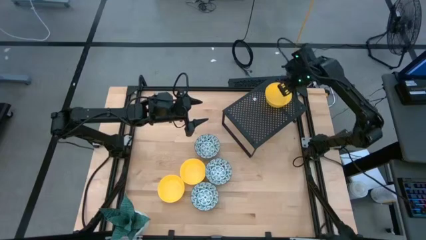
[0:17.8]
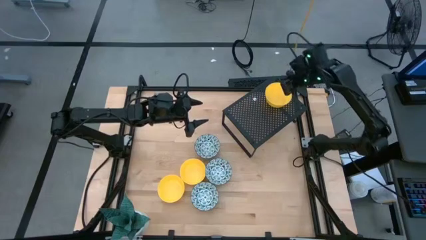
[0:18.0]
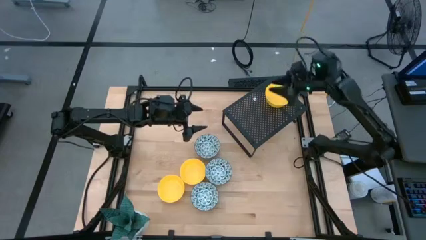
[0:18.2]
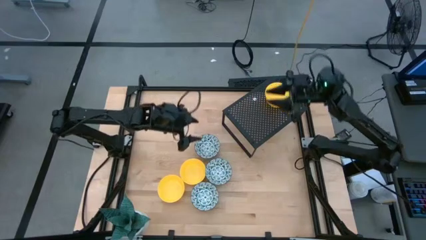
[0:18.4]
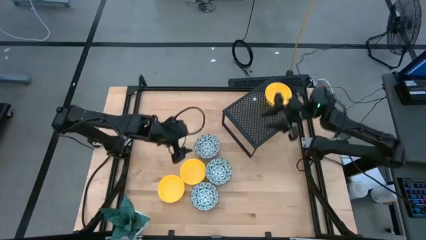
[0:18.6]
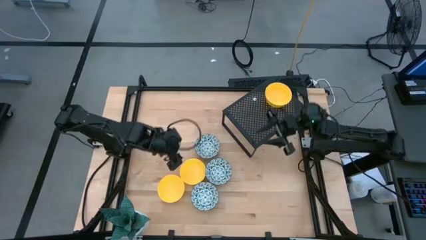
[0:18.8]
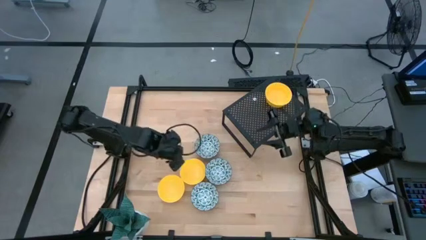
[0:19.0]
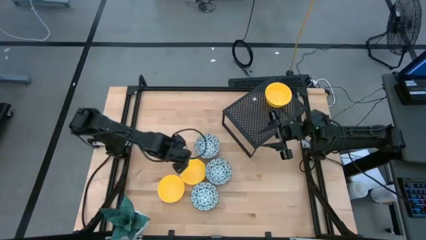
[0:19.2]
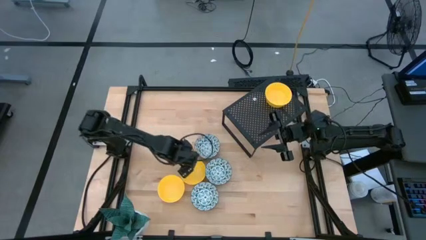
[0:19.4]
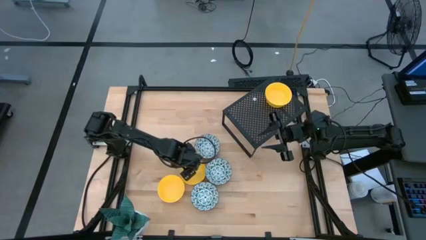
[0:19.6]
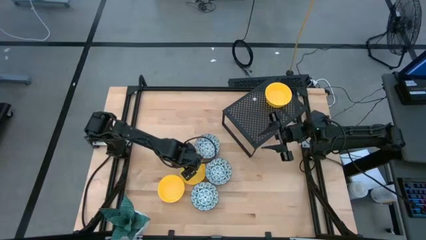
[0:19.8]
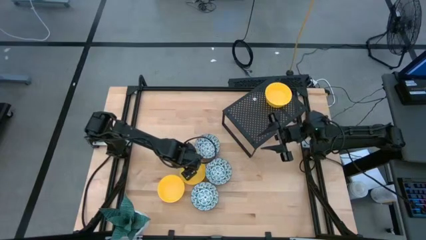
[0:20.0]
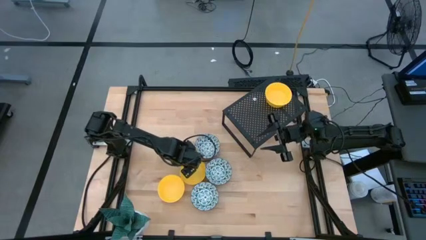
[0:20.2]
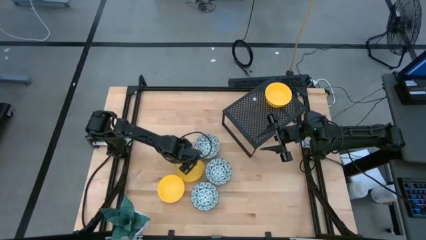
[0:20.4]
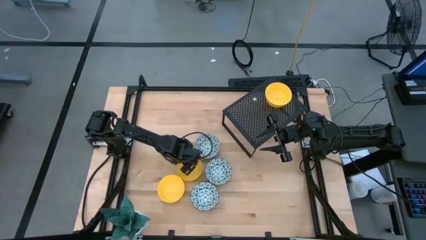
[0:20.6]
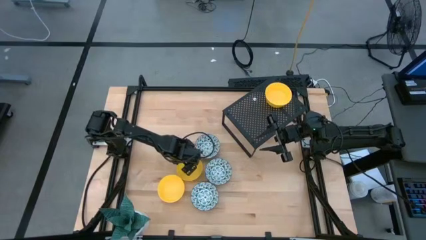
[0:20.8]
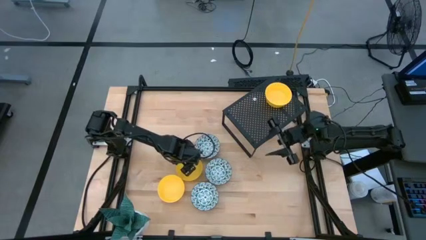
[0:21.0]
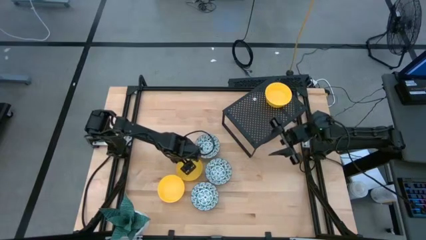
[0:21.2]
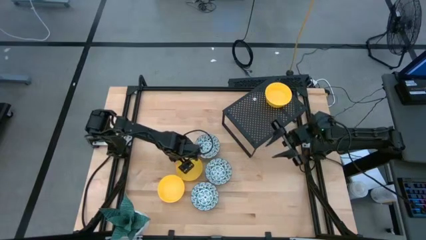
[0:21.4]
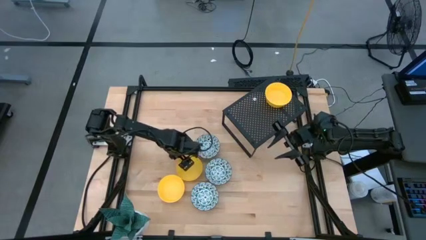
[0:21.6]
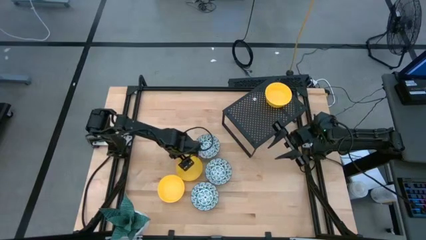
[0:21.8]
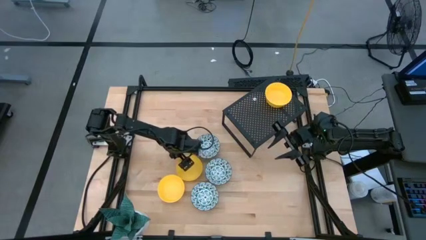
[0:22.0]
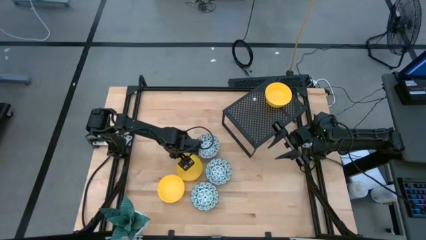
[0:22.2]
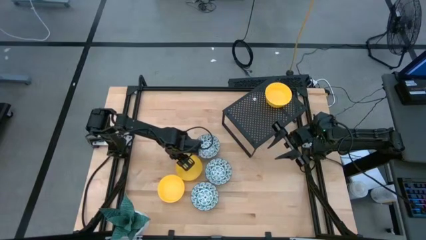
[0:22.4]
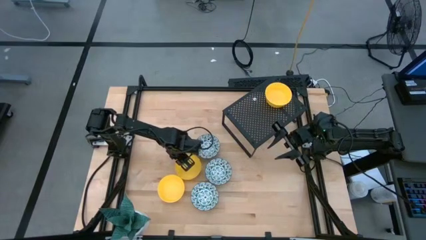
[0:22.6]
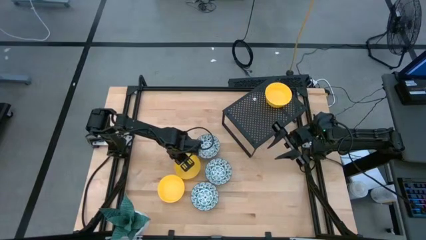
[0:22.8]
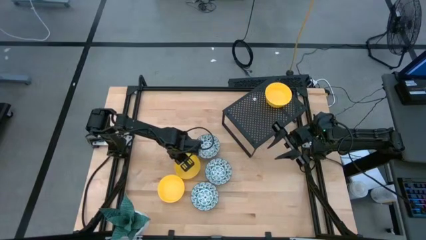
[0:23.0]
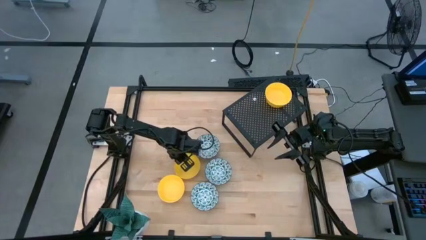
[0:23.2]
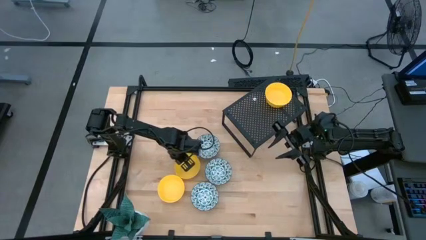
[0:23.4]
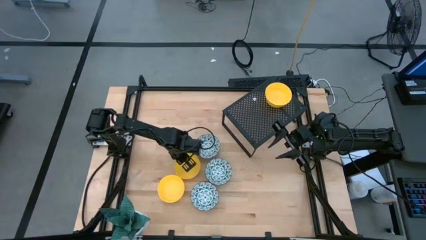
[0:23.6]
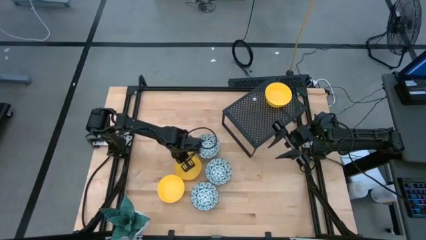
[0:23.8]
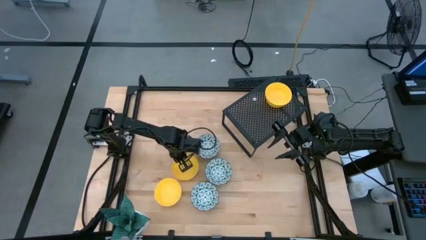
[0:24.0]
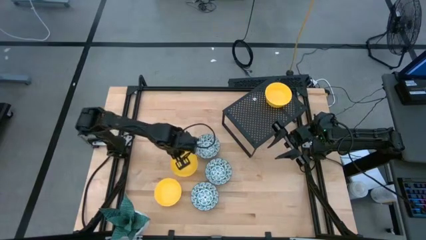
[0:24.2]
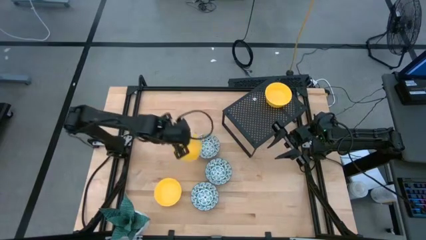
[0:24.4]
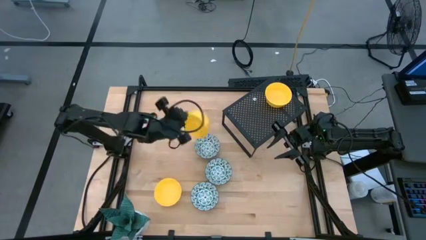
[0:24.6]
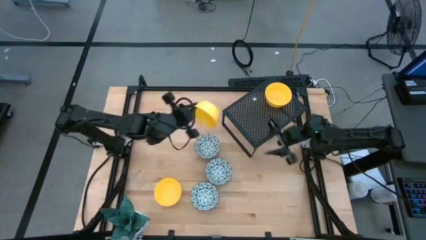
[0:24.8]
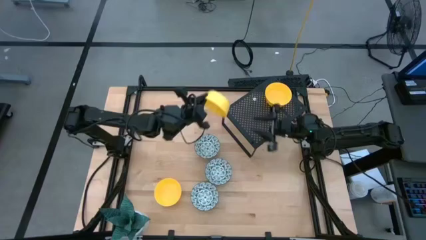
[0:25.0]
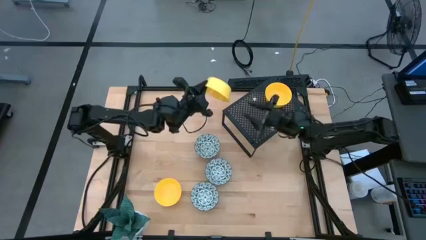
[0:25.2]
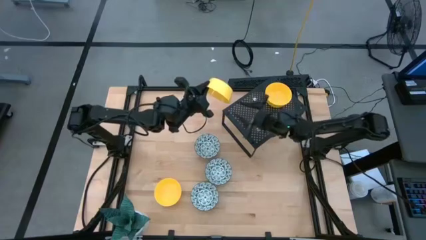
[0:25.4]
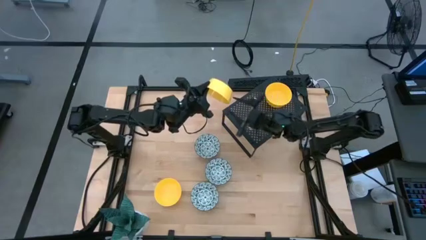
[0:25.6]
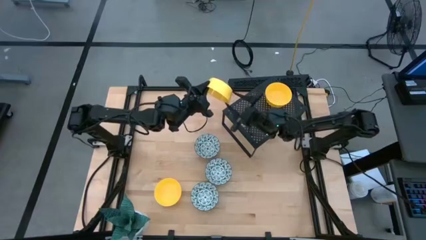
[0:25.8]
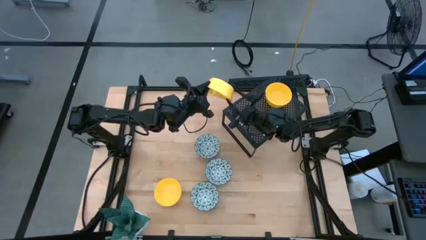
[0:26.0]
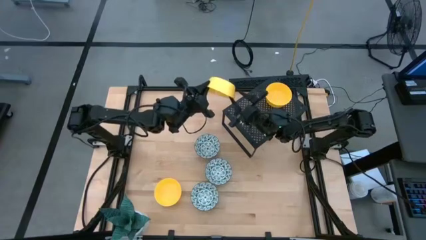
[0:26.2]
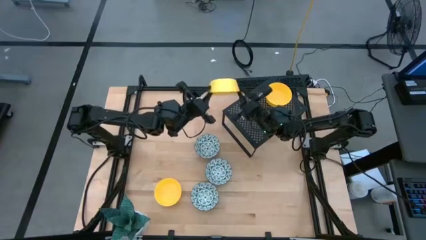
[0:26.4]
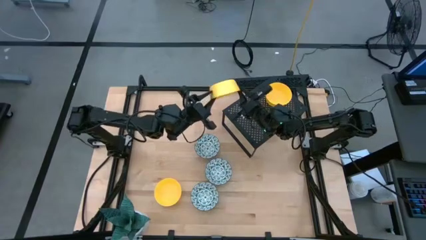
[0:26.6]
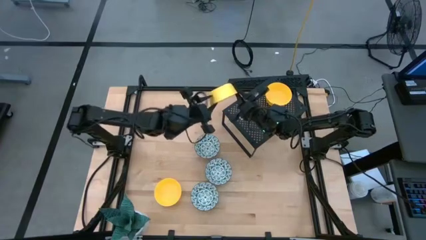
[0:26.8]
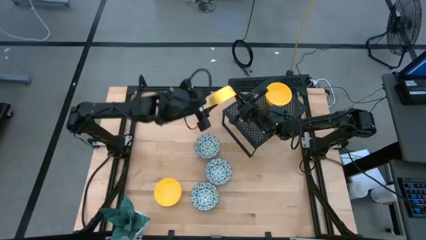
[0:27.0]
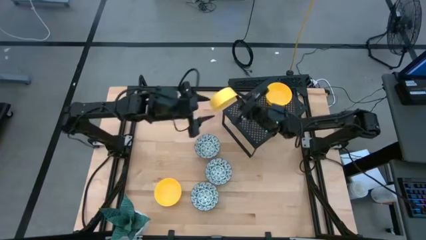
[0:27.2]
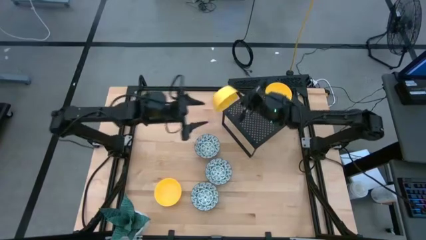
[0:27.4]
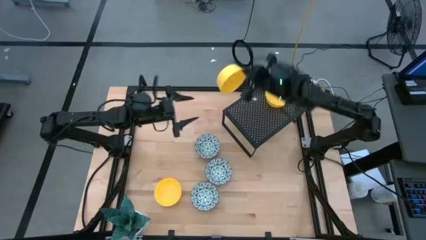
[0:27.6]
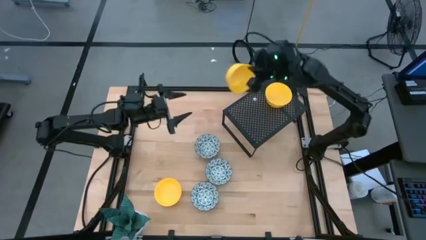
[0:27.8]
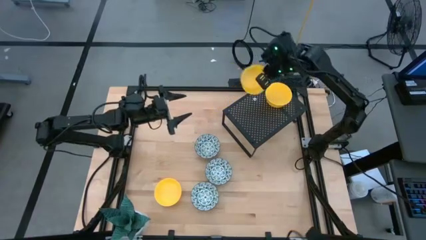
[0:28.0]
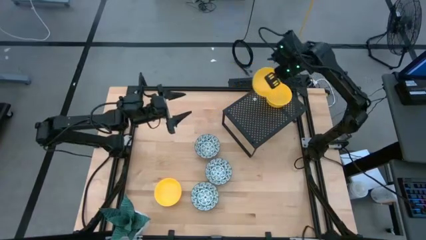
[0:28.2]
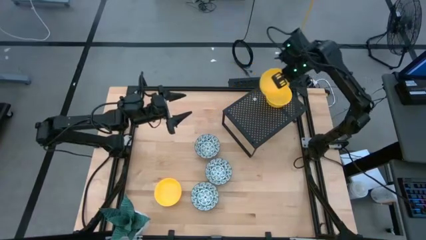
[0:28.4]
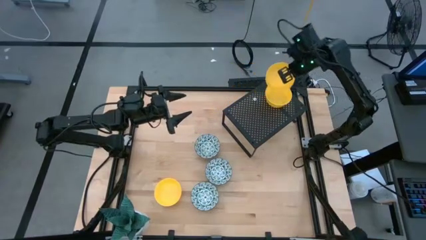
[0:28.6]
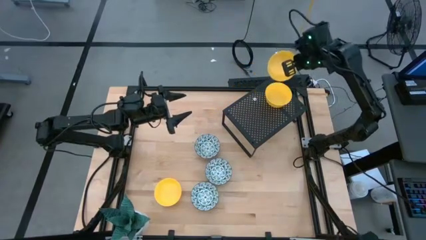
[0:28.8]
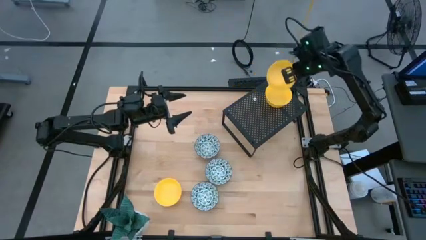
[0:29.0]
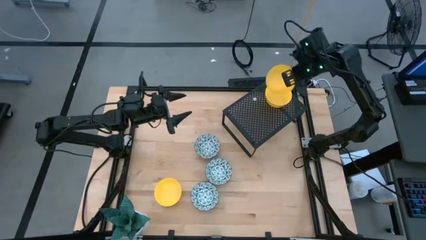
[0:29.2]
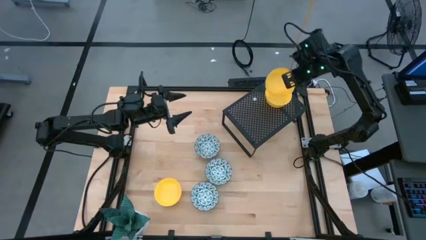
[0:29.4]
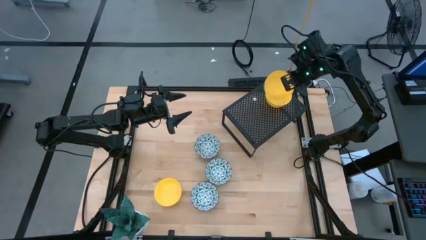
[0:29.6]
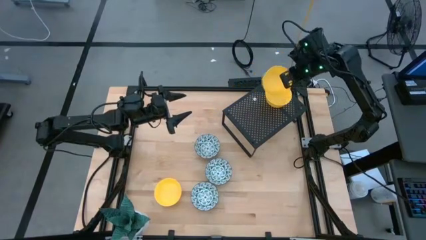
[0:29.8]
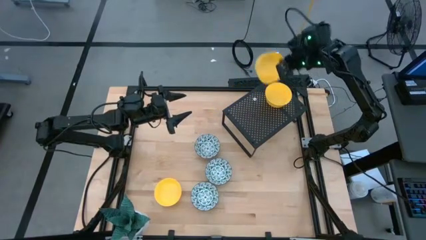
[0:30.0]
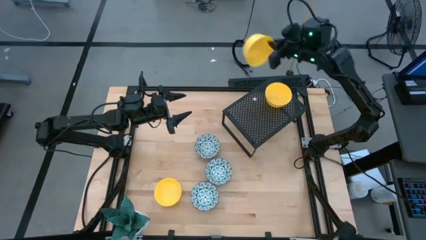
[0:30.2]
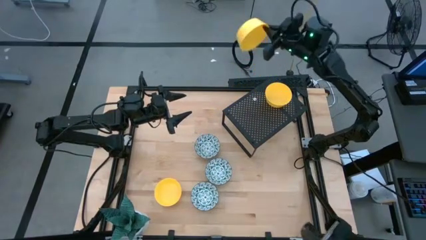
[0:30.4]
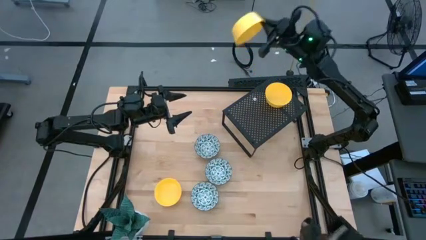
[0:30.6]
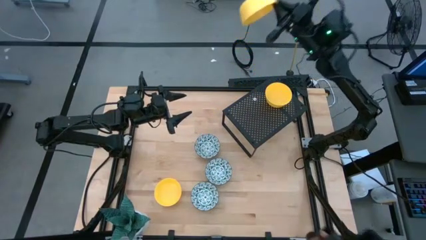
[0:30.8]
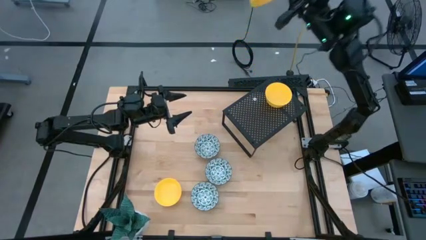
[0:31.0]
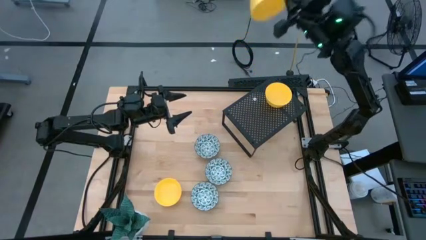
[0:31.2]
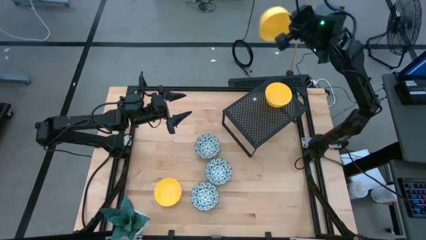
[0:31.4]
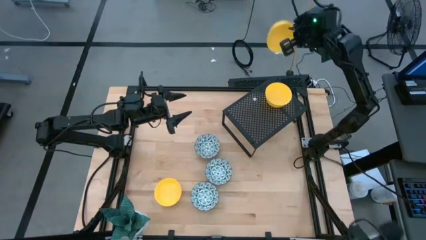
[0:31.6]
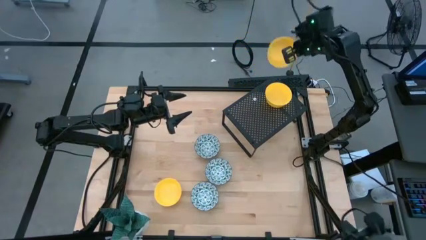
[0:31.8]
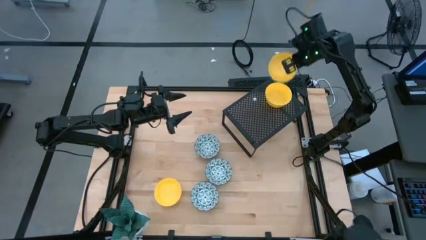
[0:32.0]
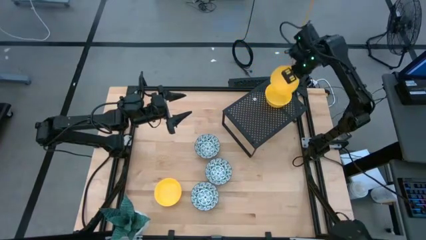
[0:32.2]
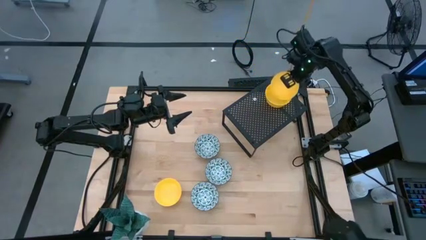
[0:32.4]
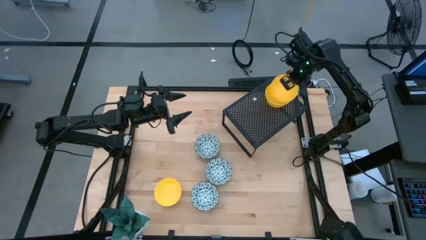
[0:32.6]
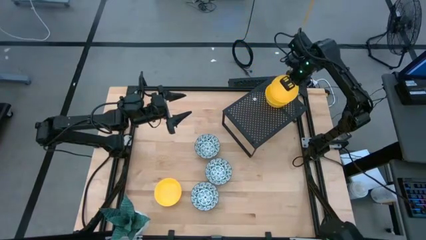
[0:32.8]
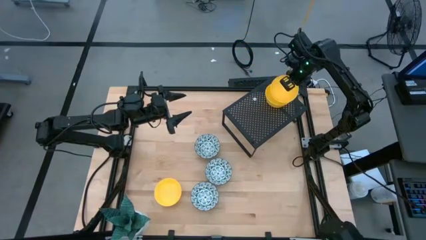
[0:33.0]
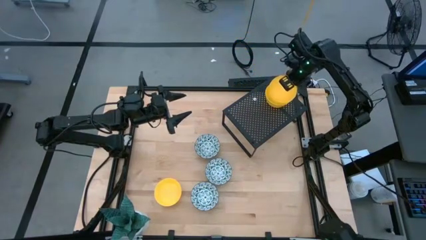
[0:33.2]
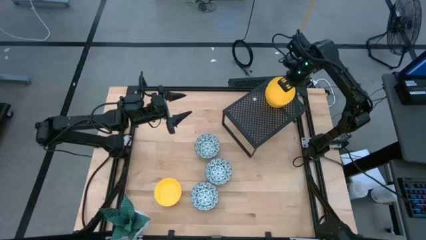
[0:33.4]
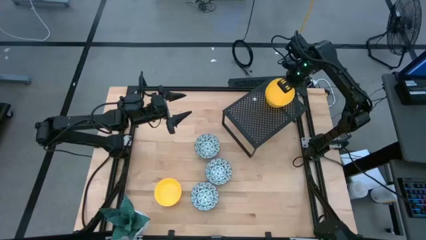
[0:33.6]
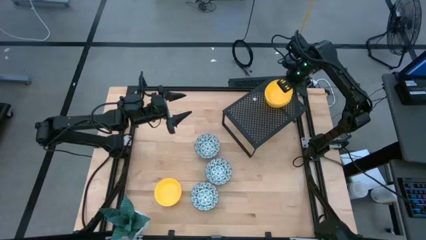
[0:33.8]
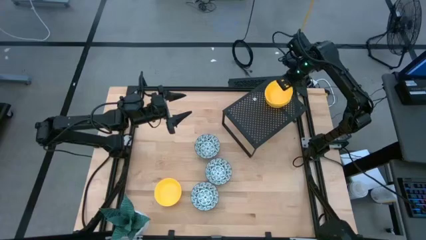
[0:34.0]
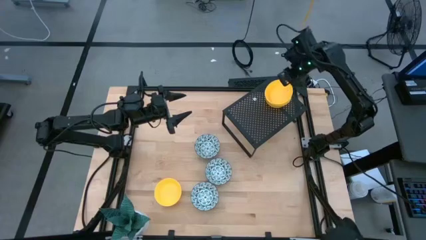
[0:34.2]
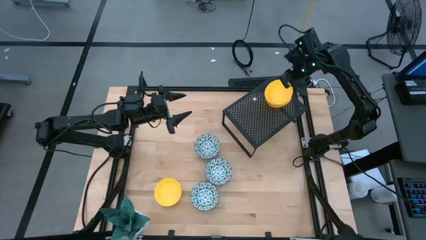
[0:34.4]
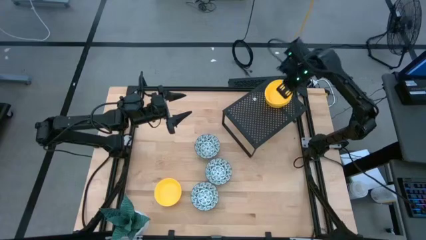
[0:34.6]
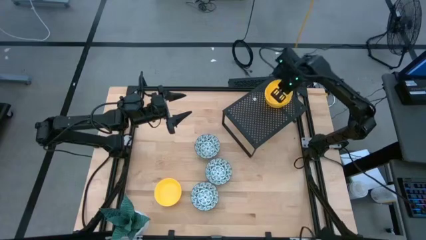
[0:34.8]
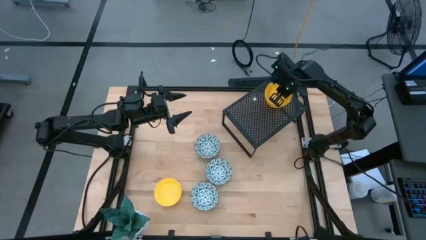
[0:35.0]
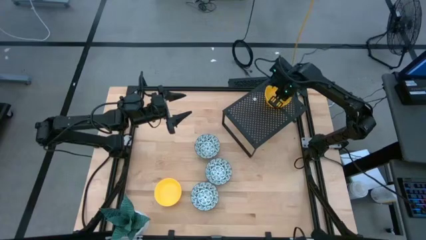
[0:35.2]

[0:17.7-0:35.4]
Task: Pick & Place Mini bowls
Stack the top yellow bowl on the yellow bowl on the shelf
